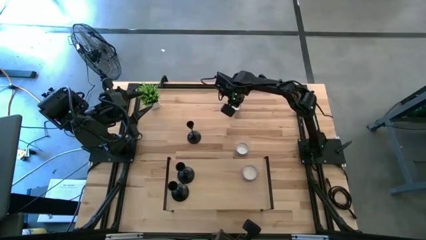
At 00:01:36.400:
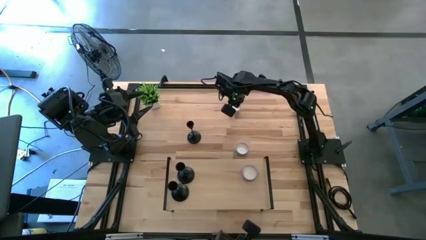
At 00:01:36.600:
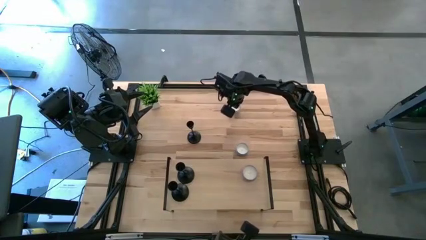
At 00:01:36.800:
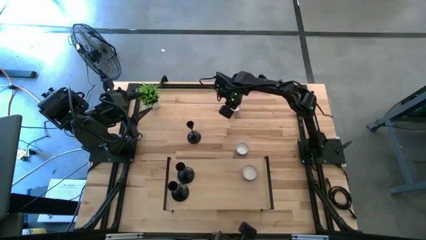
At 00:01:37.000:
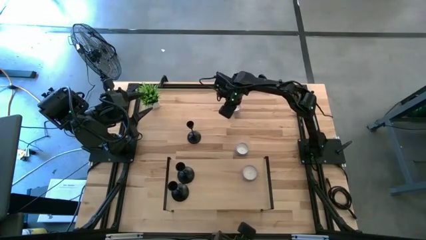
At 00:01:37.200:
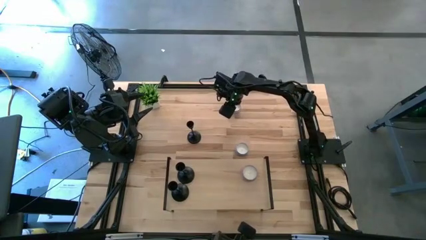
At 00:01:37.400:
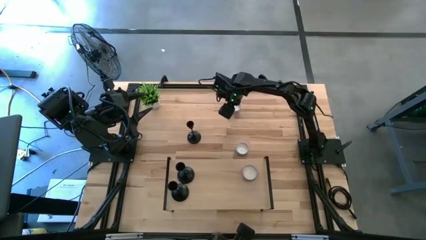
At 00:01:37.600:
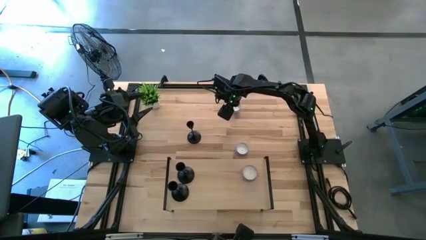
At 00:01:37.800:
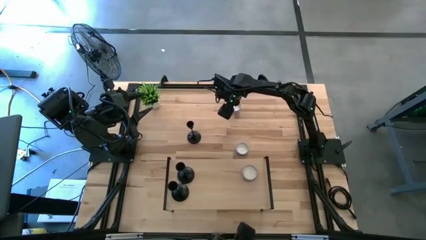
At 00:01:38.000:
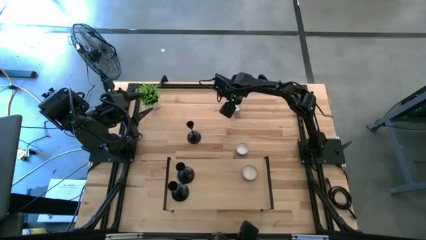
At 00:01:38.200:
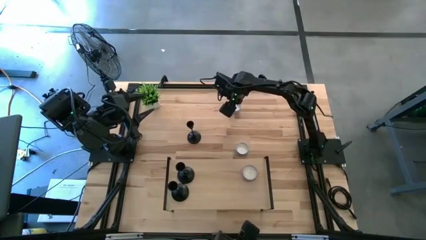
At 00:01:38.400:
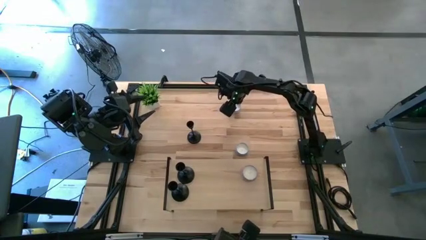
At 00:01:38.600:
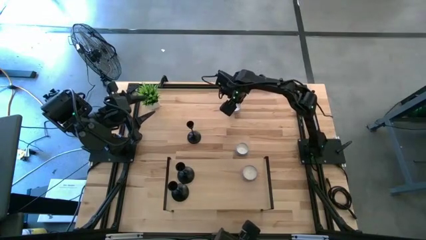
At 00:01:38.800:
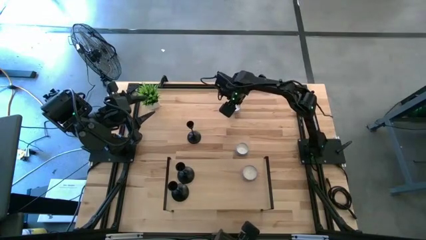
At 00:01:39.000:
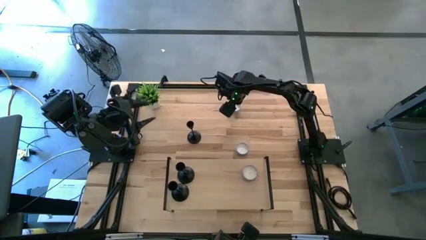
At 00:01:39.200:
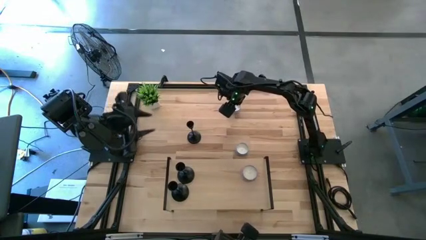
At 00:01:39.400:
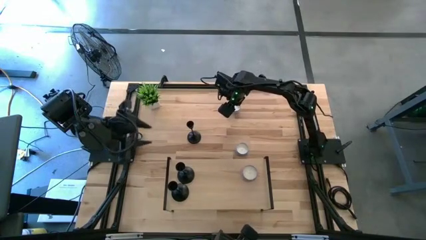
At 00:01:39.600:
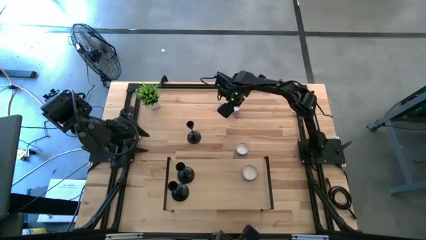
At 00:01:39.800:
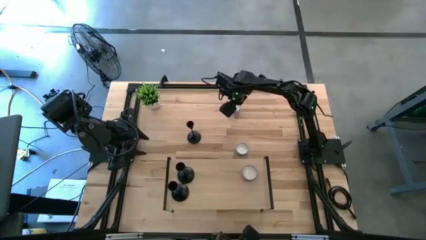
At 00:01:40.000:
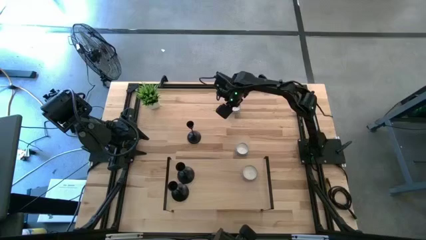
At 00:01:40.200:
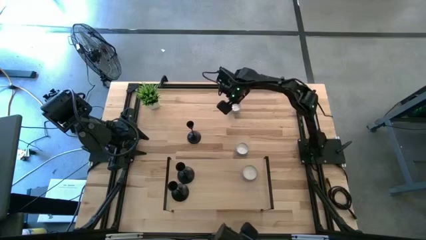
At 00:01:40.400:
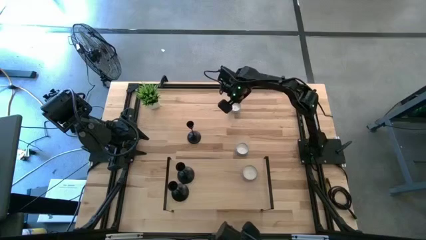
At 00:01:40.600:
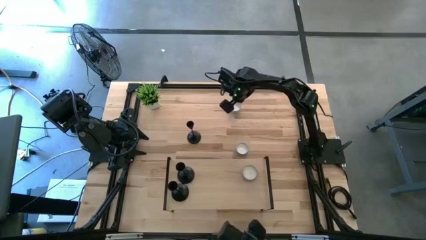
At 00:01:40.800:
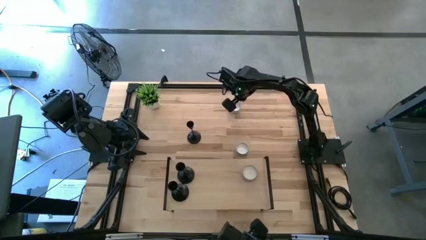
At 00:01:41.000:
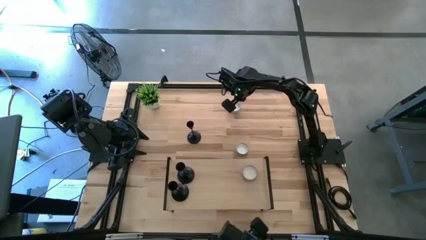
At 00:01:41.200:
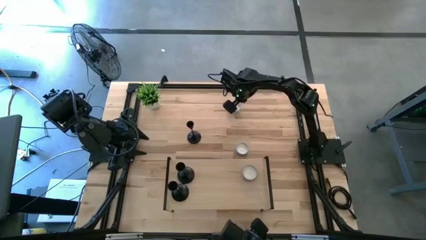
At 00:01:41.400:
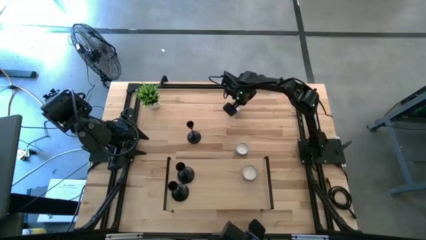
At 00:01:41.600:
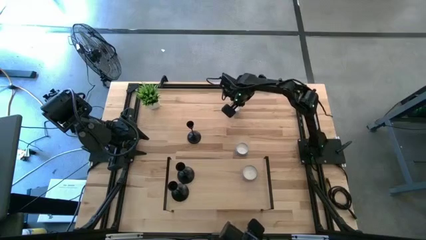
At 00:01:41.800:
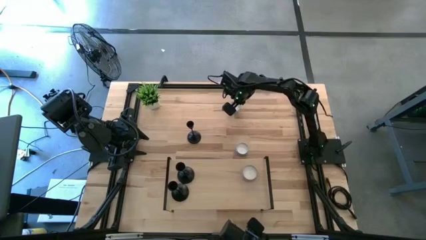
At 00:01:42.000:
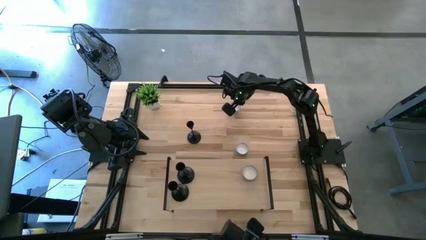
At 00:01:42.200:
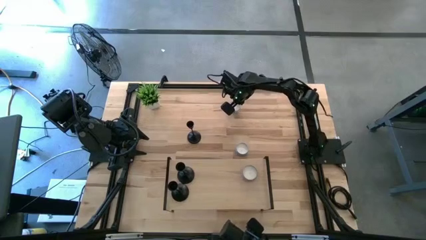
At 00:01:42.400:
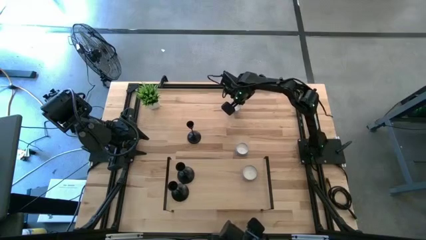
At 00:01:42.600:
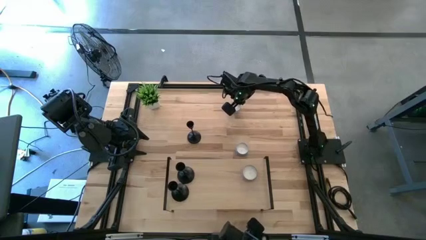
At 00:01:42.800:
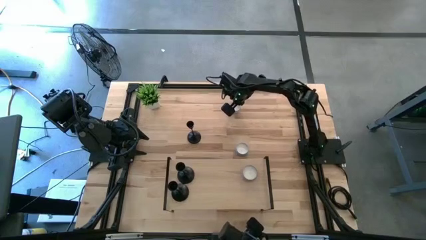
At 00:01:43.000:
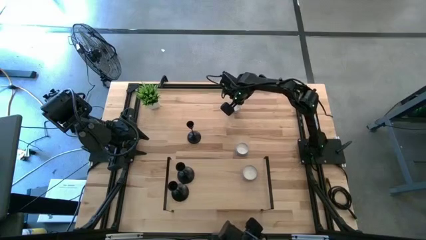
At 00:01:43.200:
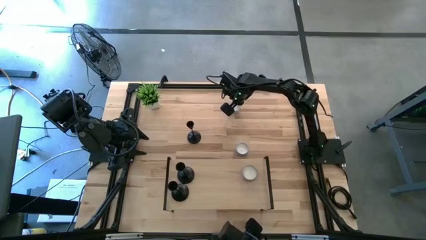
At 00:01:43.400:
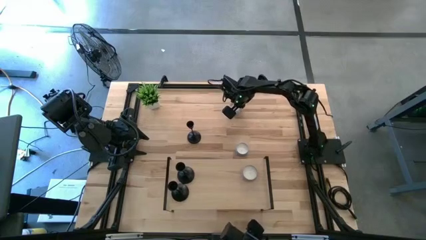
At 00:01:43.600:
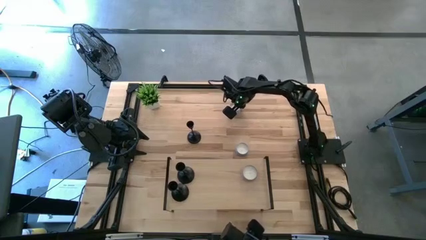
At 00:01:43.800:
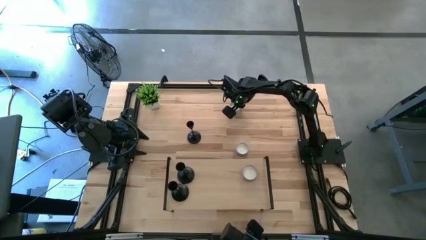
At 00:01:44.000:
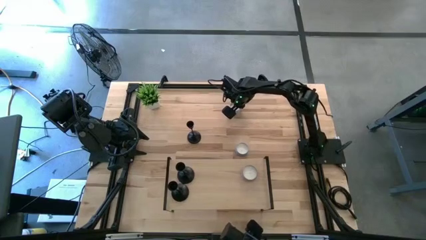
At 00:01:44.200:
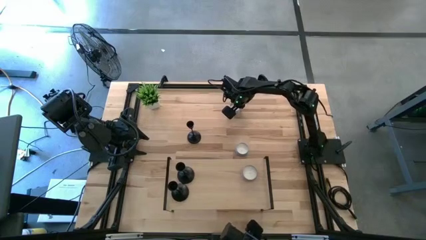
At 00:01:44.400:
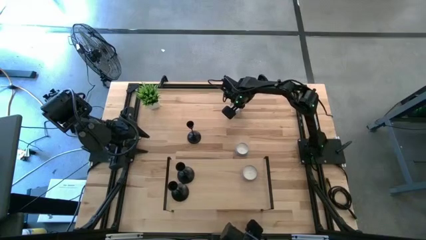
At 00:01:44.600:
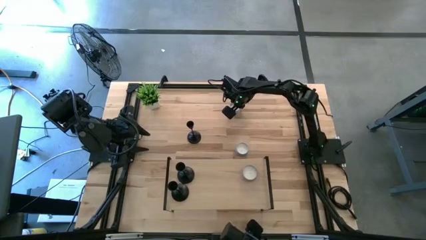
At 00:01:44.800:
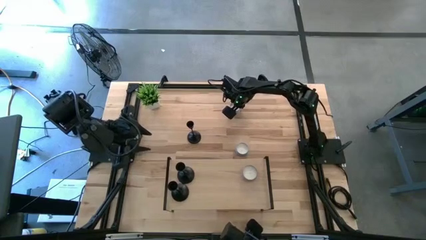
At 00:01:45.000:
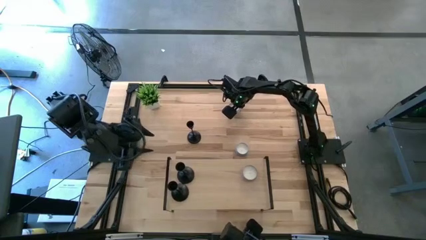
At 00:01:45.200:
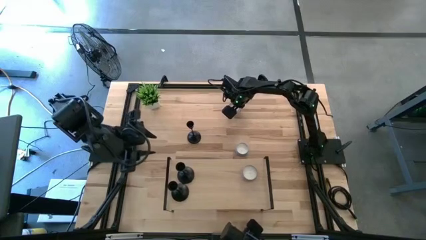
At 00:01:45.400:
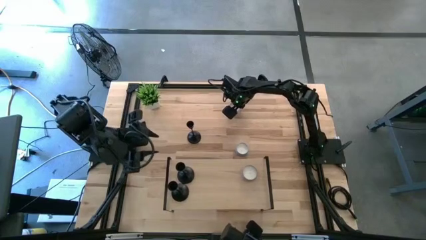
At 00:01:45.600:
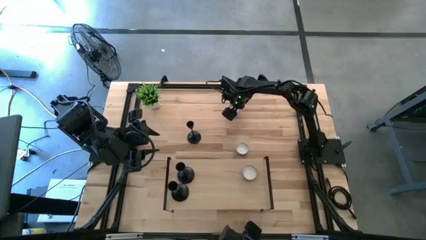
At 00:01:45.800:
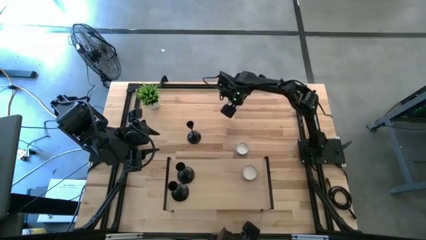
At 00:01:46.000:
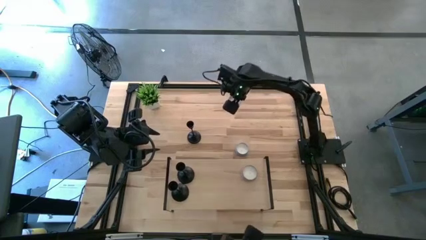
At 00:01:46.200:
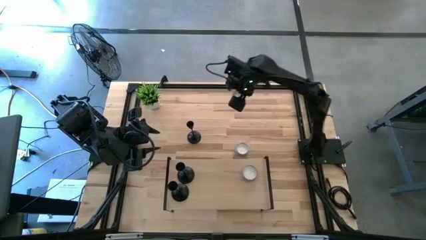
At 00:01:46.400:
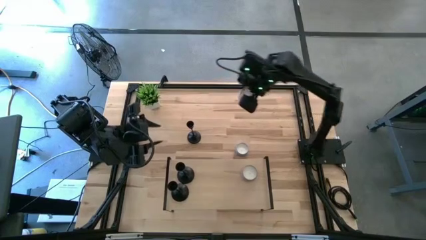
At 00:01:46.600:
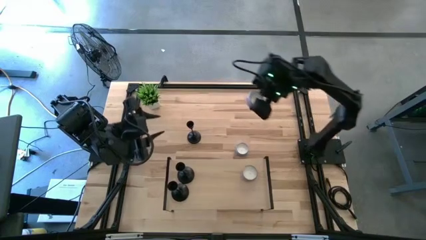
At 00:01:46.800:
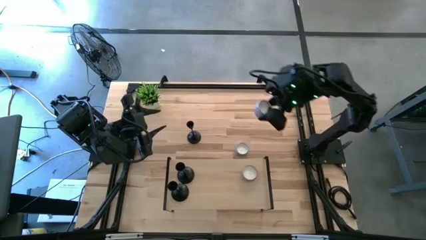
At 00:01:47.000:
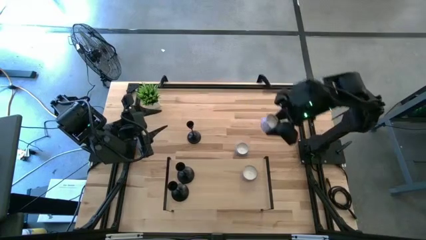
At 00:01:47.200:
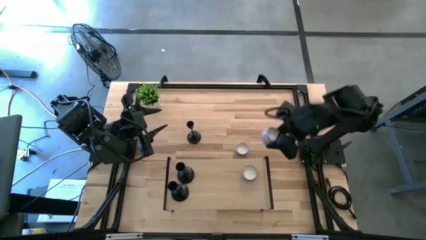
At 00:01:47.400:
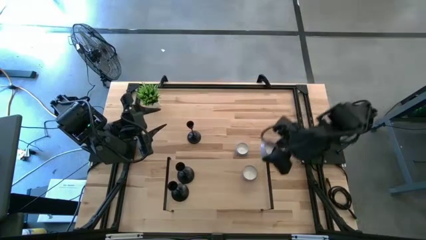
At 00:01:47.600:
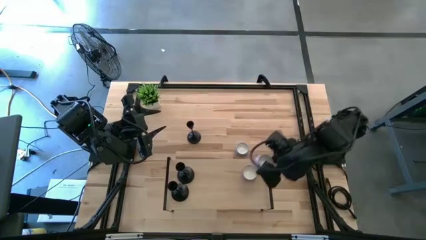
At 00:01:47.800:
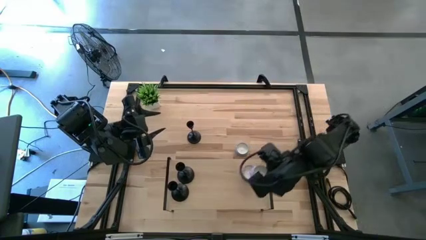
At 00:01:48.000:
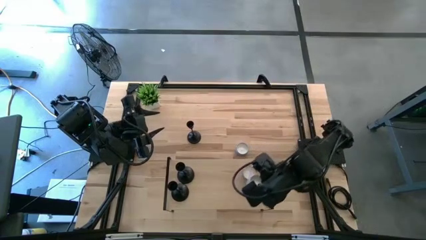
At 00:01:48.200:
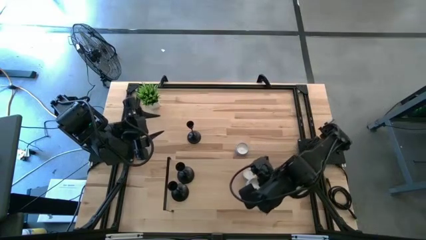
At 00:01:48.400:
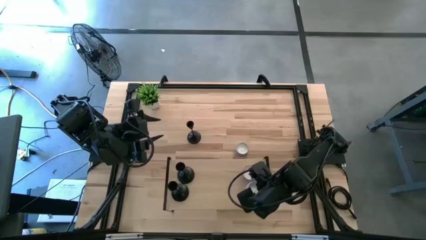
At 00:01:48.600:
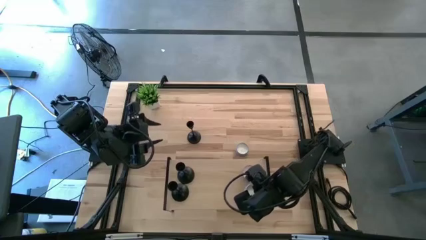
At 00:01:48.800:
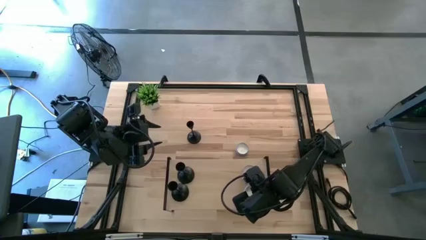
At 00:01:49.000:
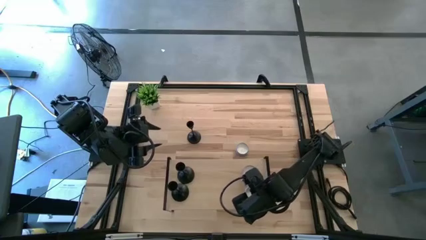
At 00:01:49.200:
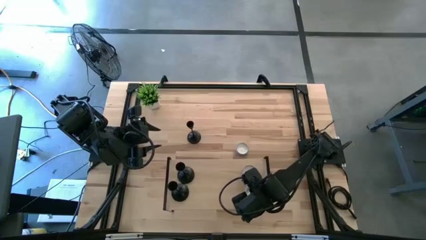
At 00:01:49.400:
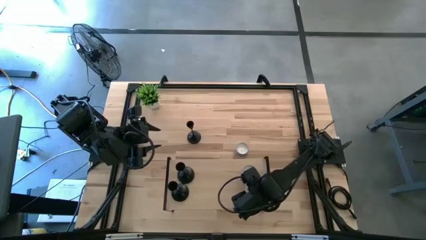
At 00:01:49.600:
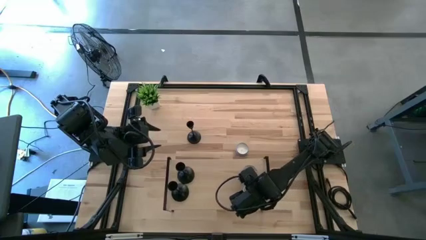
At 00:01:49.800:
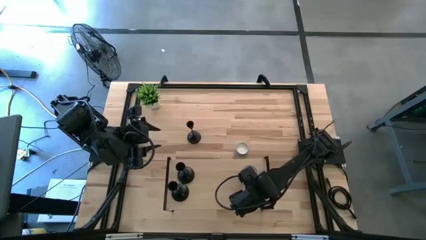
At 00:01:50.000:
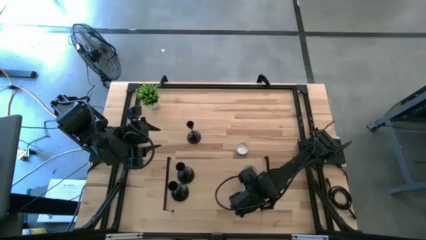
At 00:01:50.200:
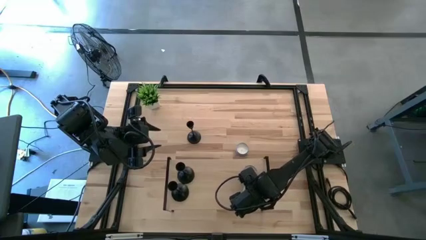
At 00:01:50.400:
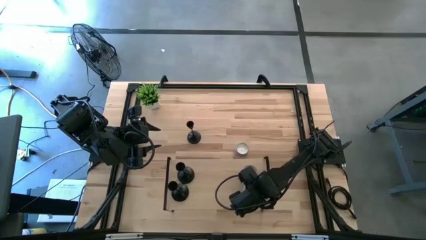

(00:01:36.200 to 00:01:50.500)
Task: Pick & Place candle stick holders
Put the red scented candle on the shelf
